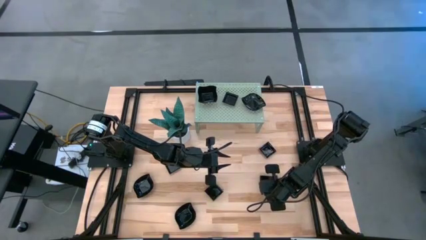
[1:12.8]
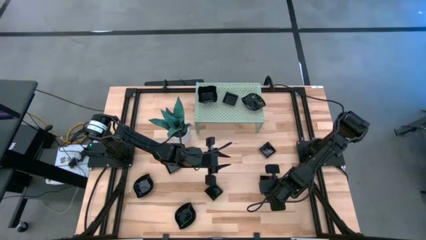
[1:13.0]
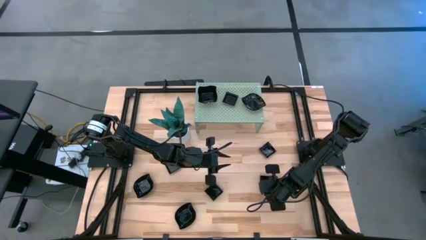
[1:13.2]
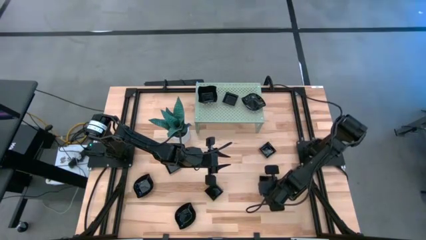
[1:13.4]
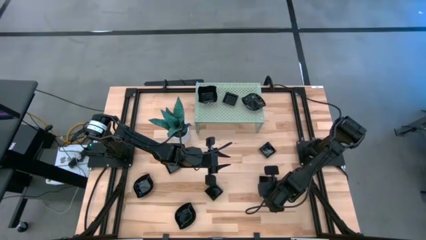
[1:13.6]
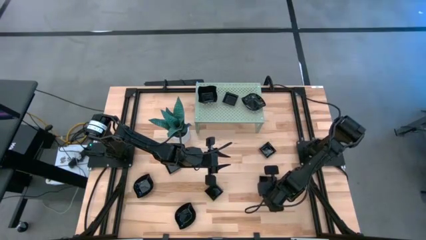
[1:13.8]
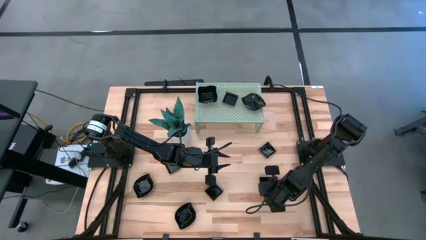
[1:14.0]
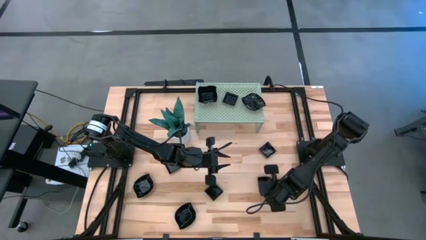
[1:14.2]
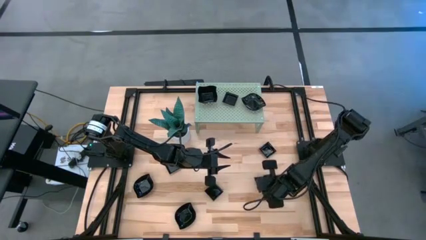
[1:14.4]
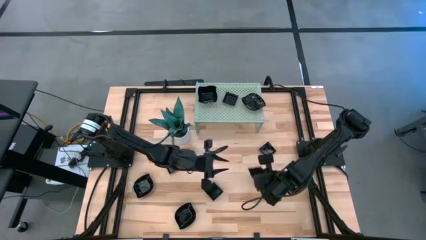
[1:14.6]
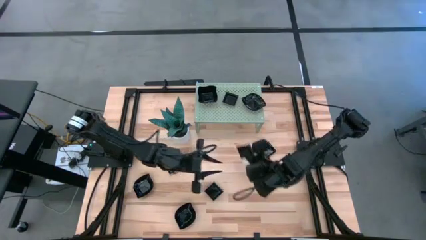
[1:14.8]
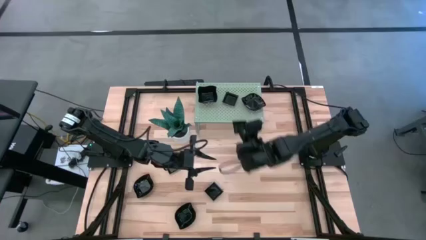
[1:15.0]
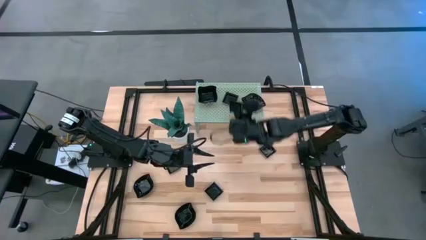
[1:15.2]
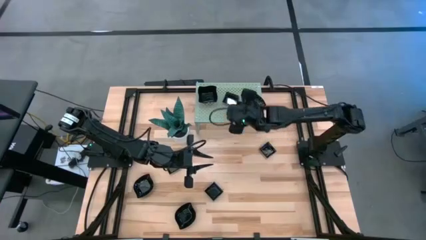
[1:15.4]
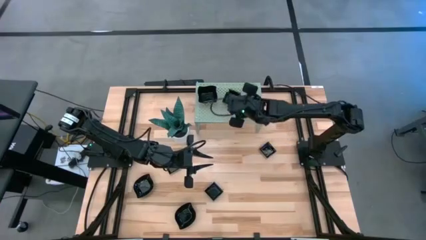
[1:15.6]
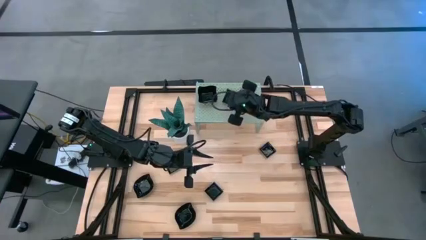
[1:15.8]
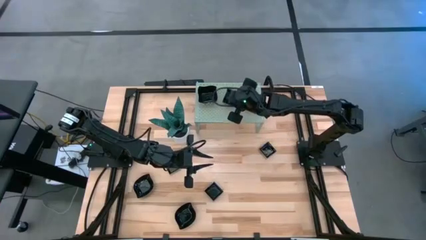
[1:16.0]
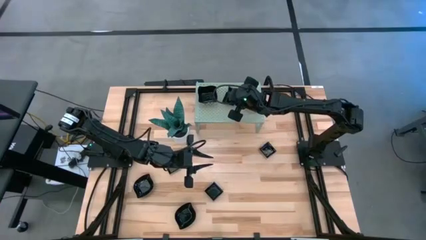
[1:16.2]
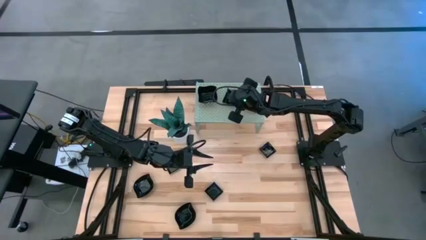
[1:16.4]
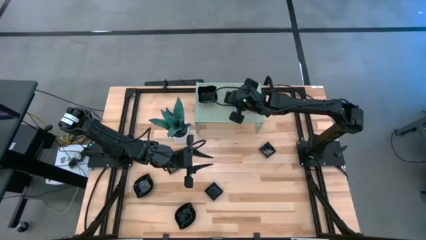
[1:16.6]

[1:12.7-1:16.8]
Task: Pick & Place Mini shaped plates
Stack the square plate on top of the other square plate on the shelf

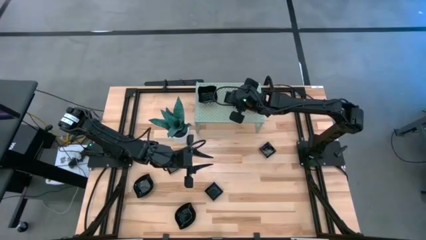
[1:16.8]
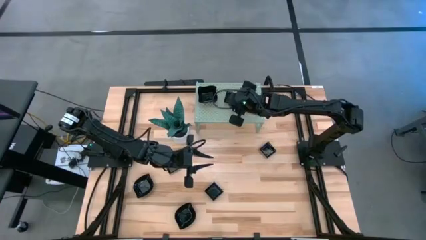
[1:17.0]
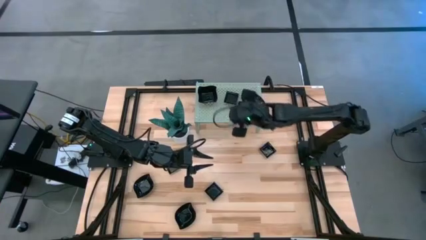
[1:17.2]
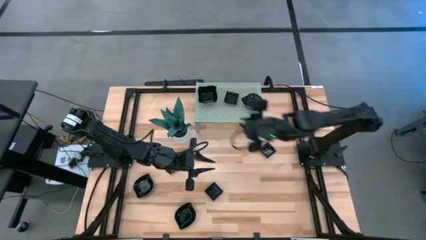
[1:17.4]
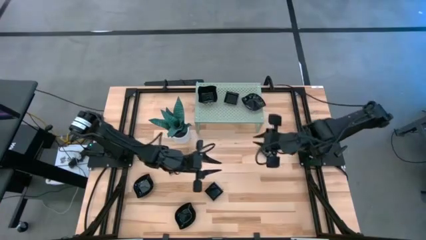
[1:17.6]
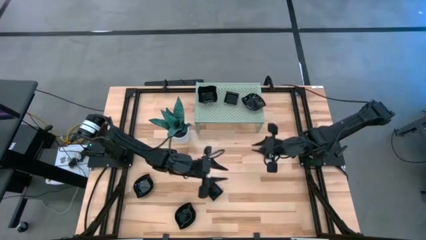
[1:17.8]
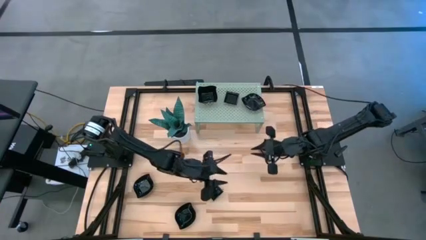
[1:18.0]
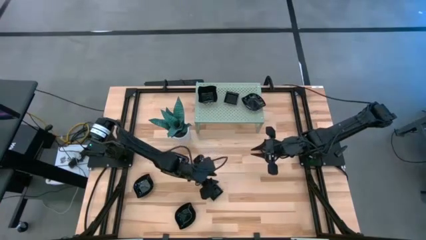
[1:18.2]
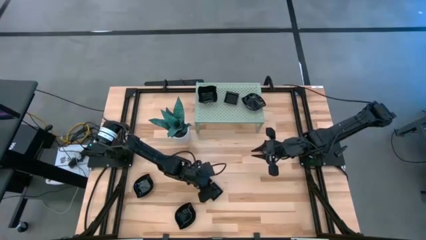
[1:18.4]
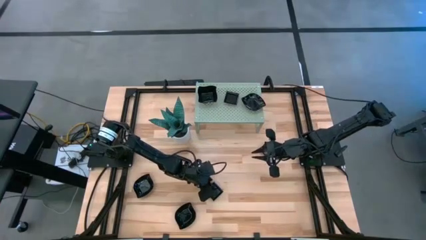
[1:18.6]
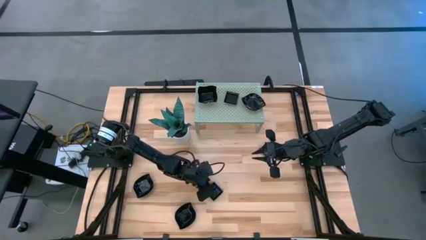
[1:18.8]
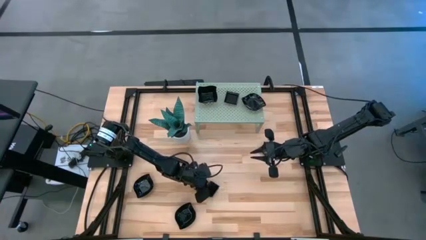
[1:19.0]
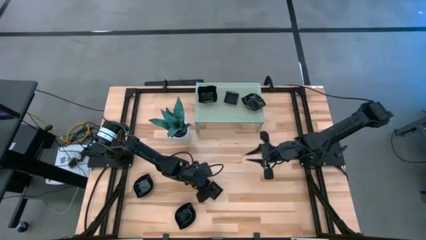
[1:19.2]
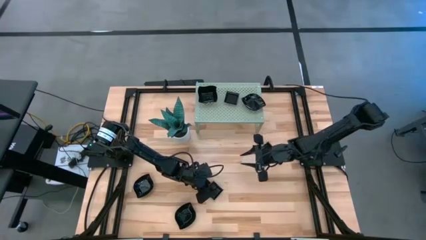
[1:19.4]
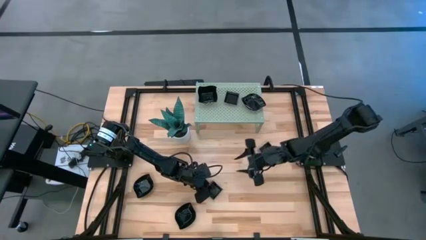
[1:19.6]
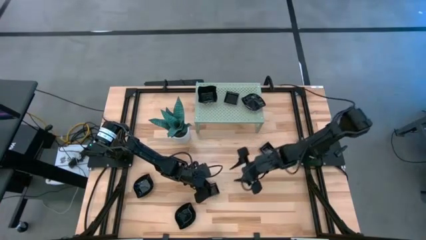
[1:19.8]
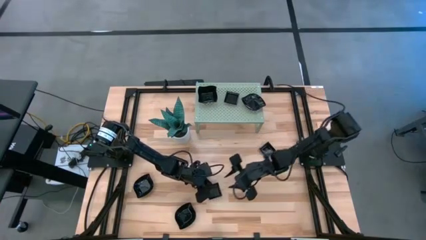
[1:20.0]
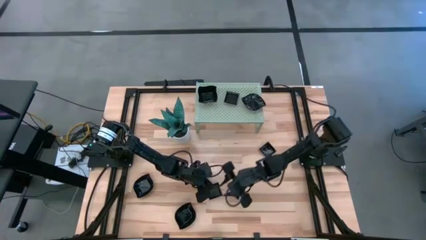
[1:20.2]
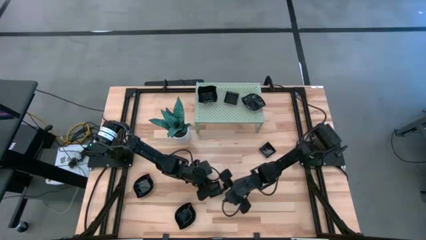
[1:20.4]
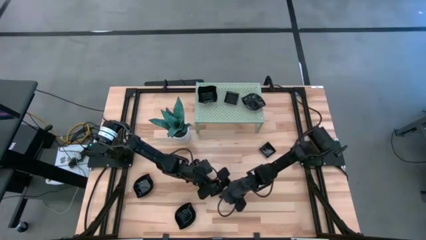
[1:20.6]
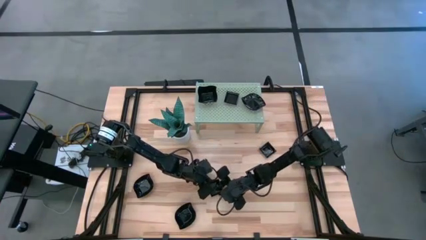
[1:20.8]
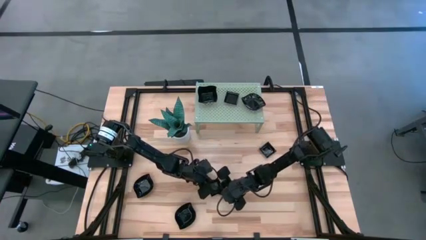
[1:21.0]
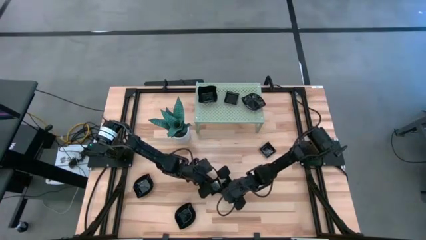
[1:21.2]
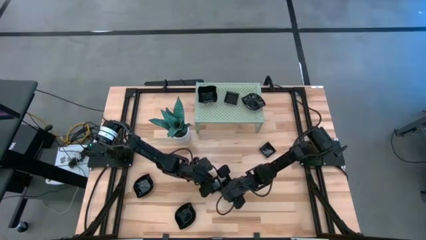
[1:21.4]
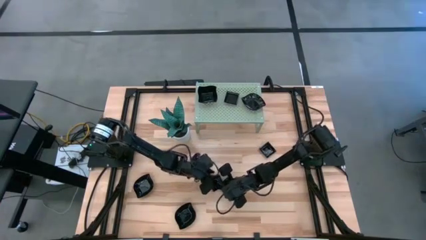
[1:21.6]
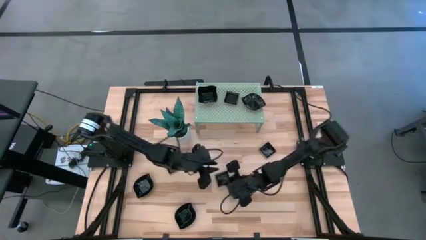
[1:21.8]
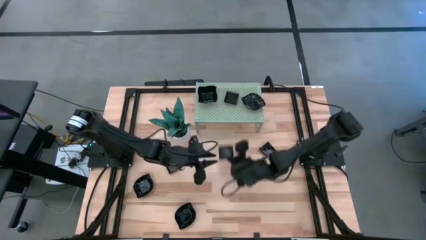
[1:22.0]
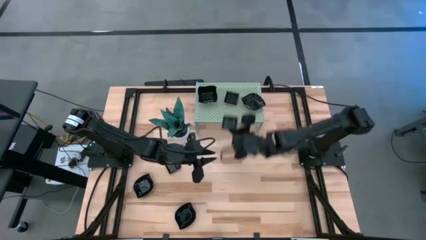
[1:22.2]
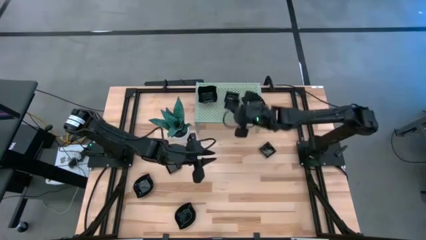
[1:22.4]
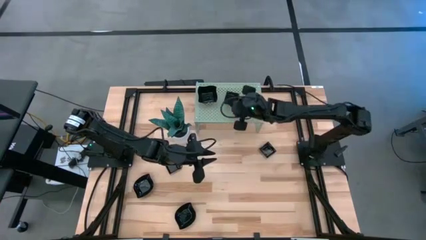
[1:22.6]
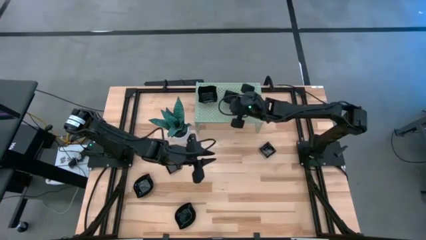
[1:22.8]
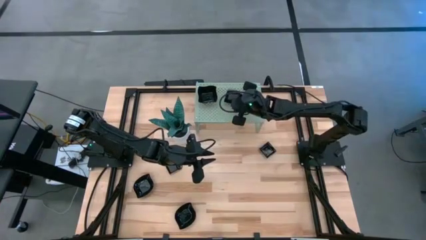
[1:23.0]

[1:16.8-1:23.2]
Stack the square plate on top of the other square plate on the shelf

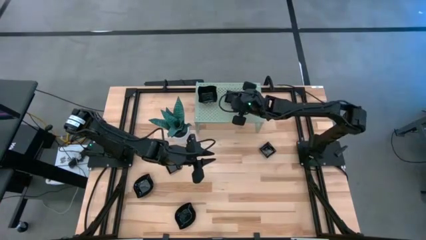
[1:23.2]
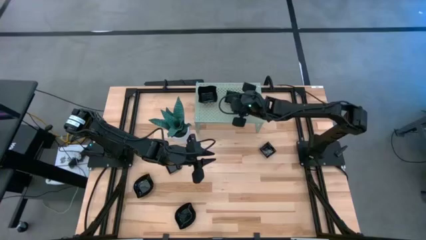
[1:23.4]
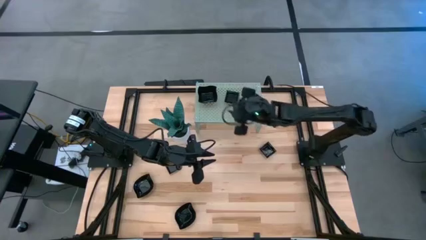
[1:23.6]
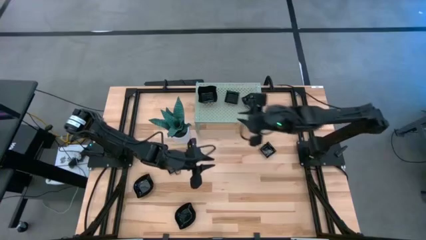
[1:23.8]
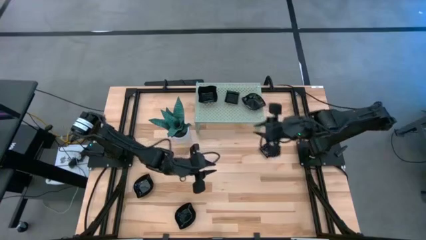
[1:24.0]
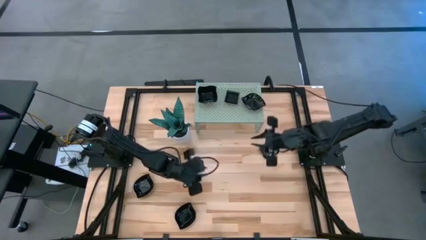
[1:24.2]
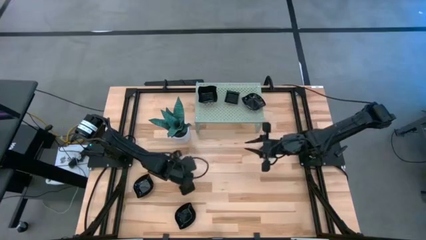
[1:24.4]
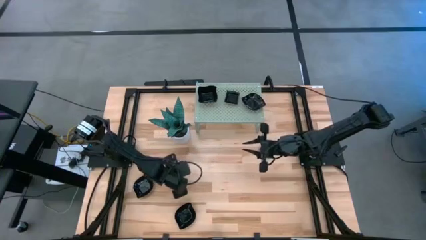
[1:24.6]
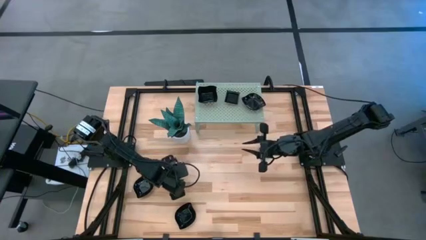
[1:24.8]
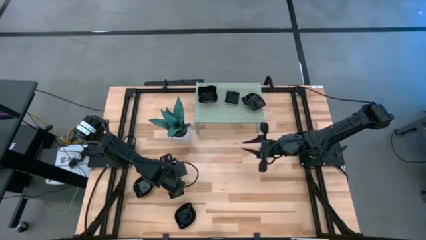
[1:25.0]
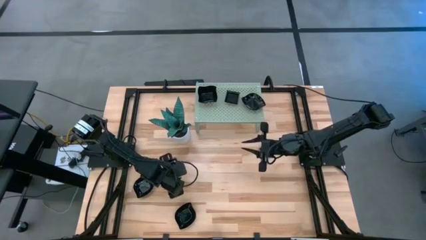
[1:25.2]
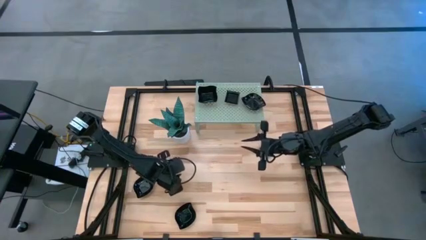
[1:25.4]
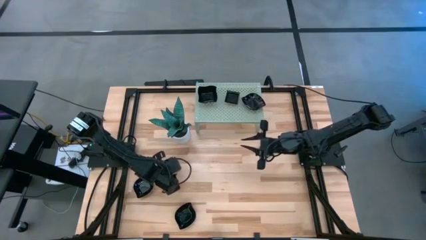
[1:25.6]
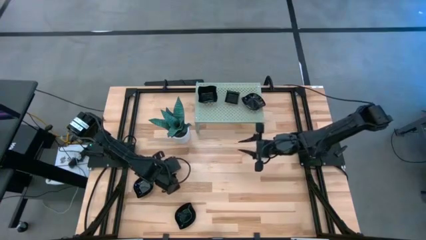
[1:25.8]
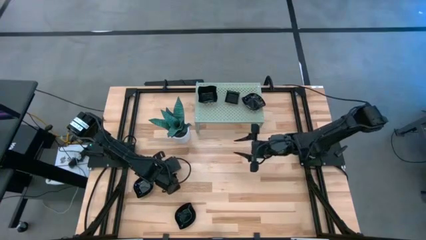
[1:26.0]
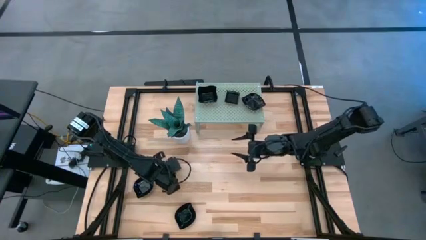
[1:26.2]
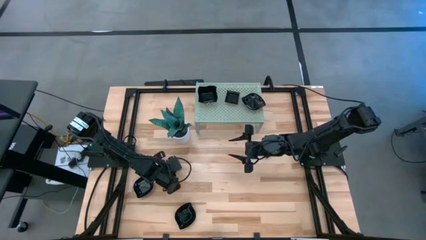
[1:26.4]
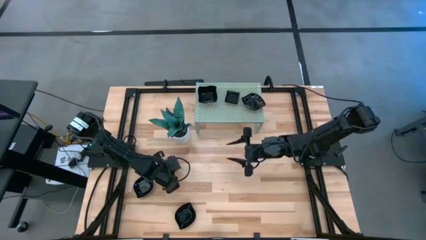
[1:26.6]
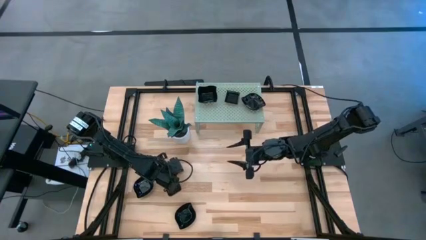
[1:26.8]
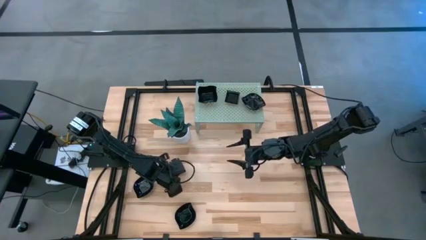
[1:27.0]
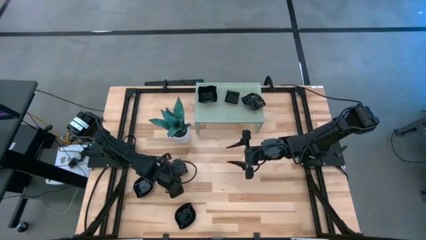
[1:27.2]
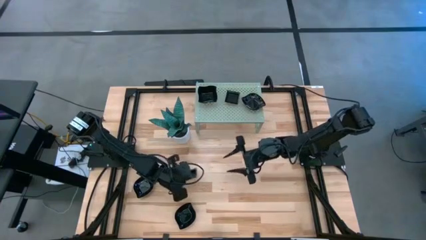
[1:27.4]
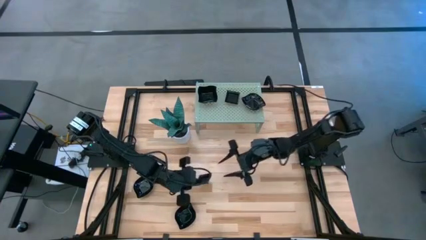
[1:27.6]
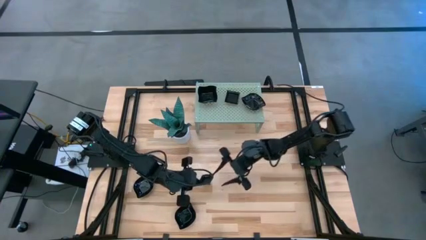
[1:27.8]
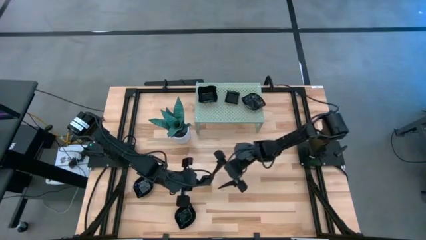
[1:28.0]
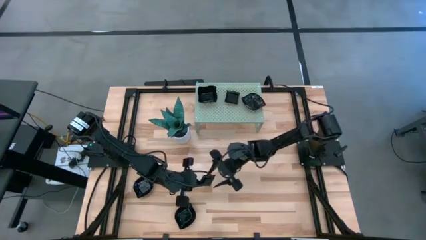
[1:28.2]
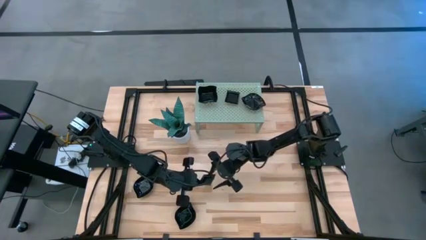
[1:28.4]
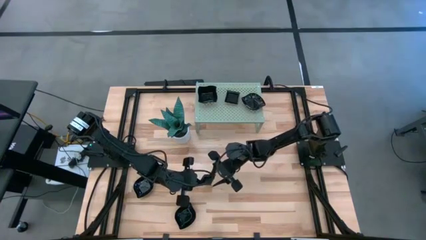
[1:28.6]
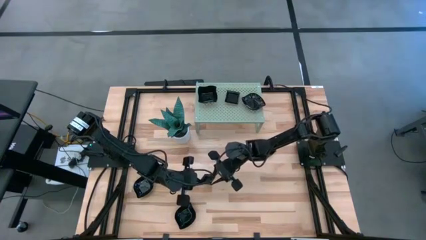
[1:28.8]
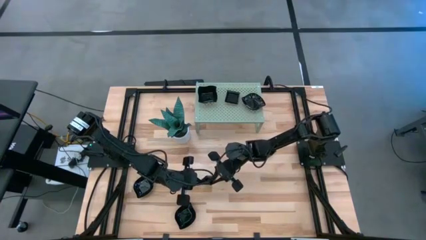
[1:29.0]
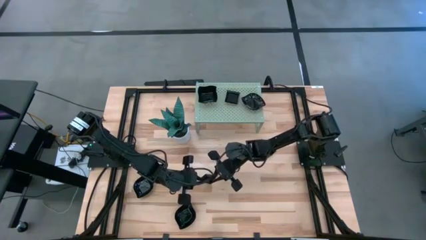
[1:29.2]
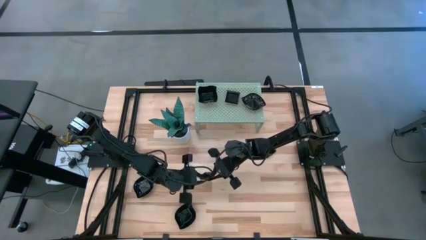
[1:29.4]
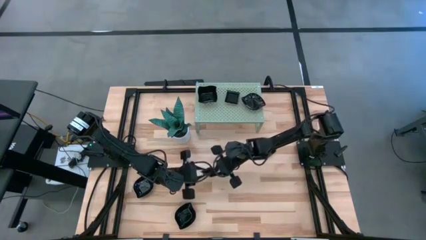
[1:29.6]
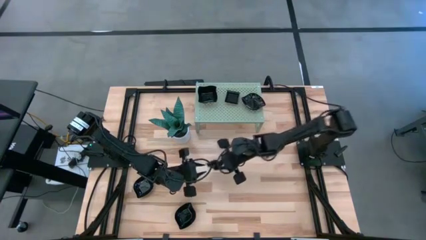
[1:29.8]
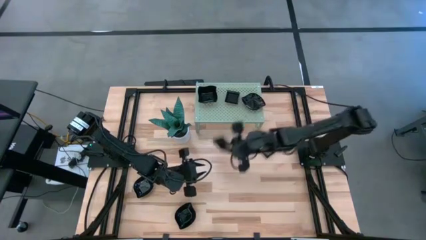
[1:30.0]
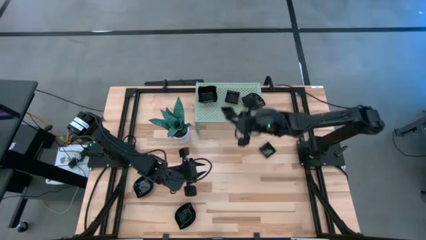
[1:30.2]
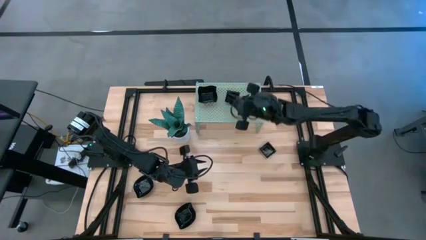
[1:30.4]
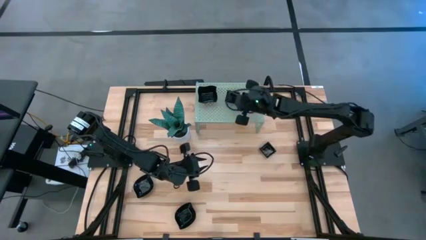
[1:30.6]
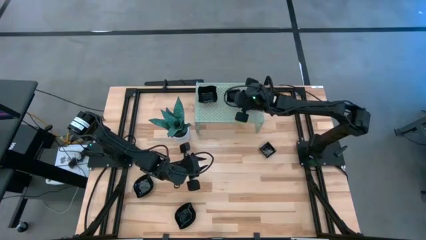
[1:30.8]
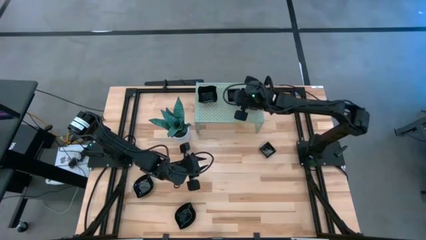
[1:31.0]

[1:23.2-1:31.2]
Stack the square plate on top of the other square plate on the shelf
